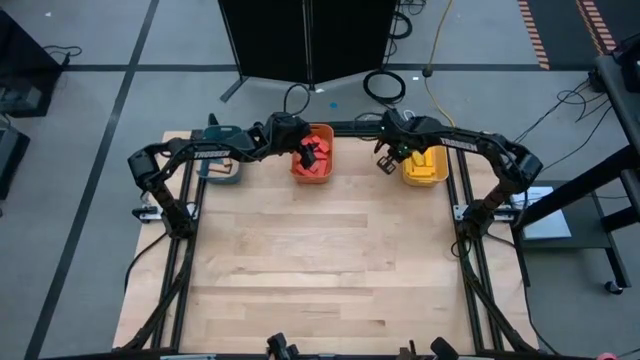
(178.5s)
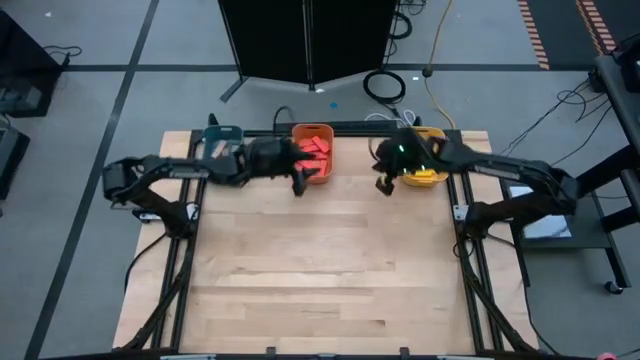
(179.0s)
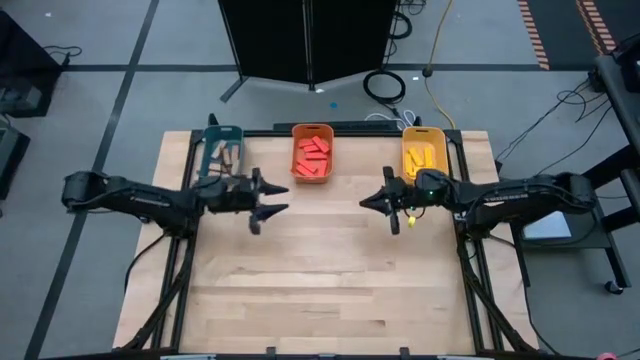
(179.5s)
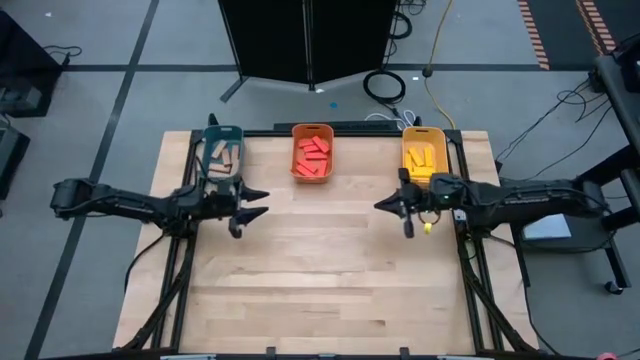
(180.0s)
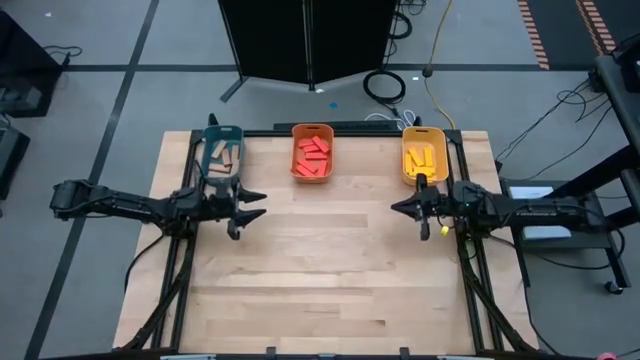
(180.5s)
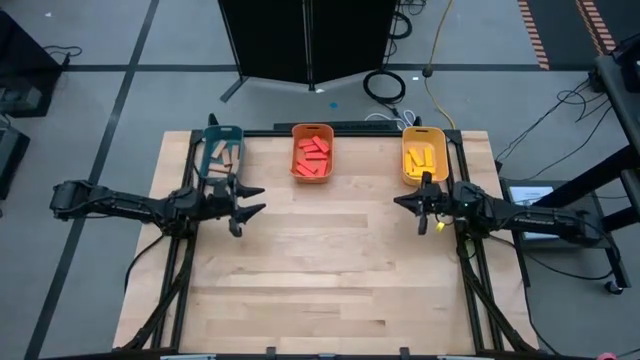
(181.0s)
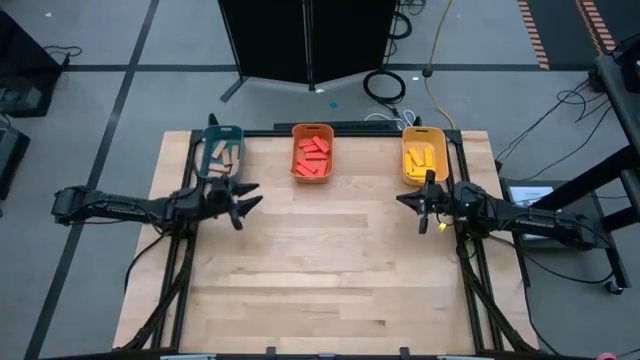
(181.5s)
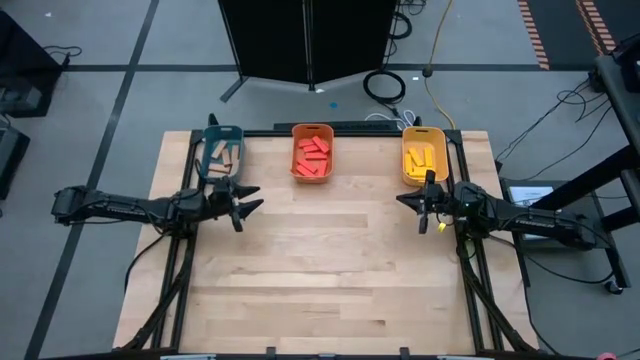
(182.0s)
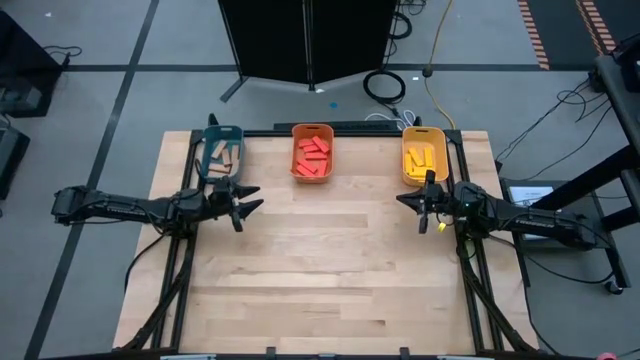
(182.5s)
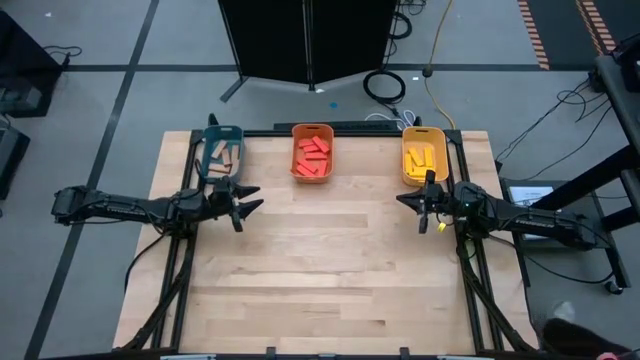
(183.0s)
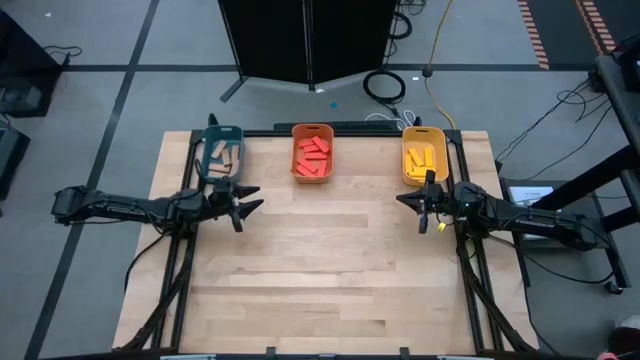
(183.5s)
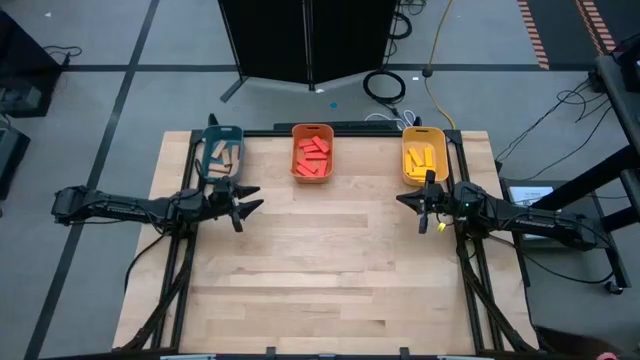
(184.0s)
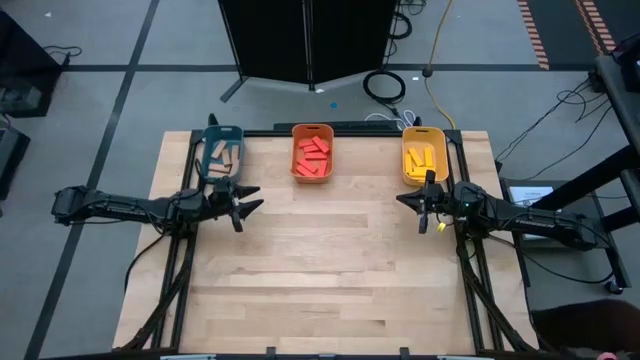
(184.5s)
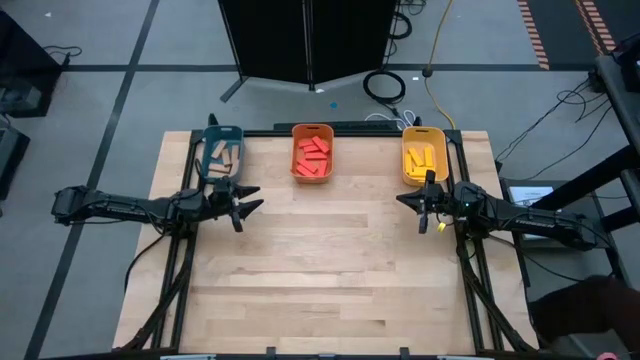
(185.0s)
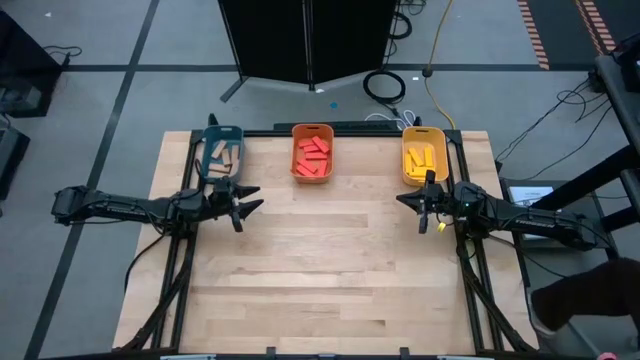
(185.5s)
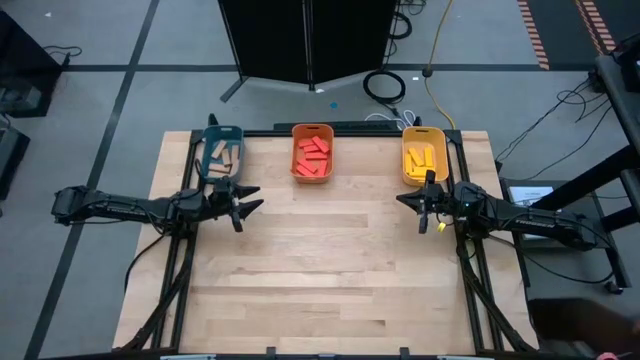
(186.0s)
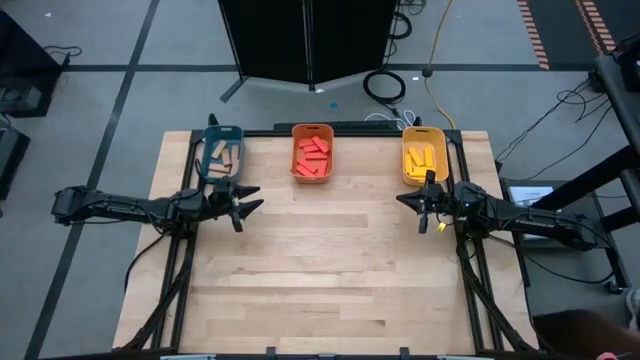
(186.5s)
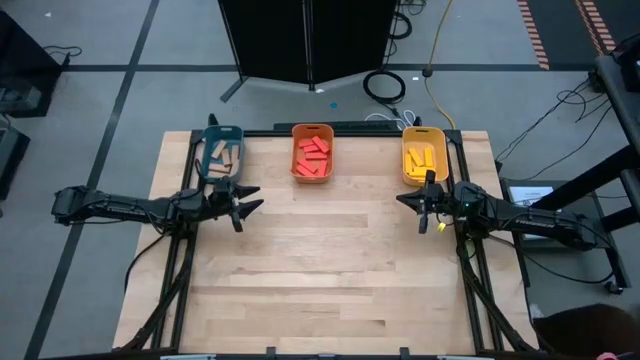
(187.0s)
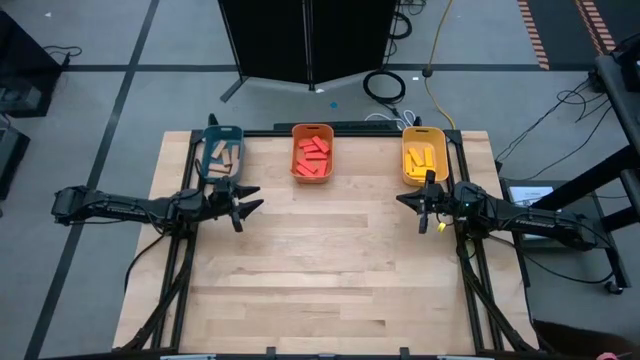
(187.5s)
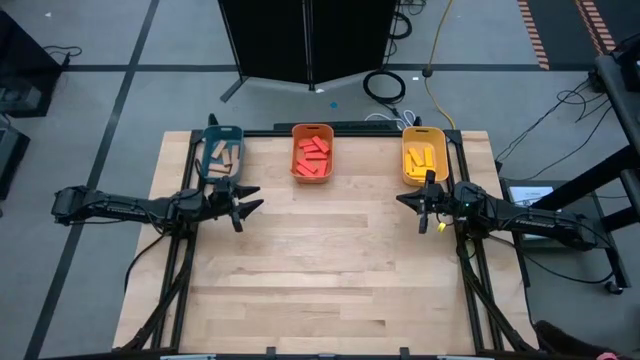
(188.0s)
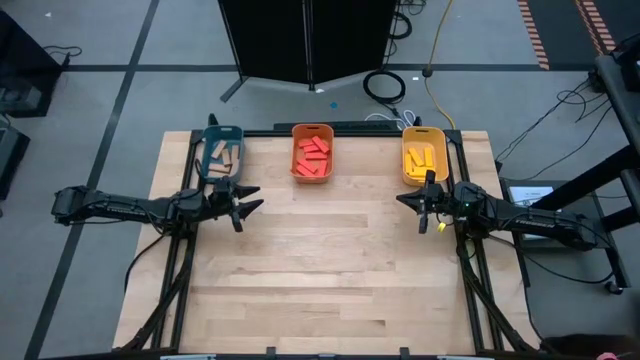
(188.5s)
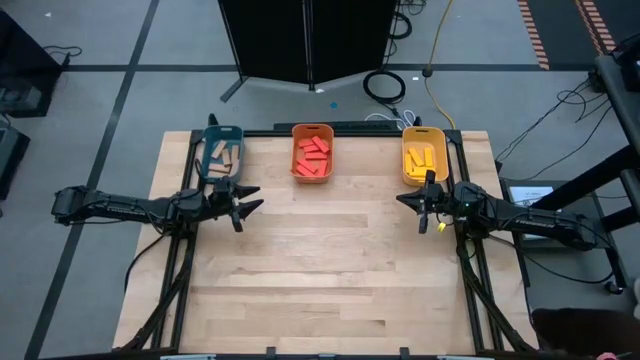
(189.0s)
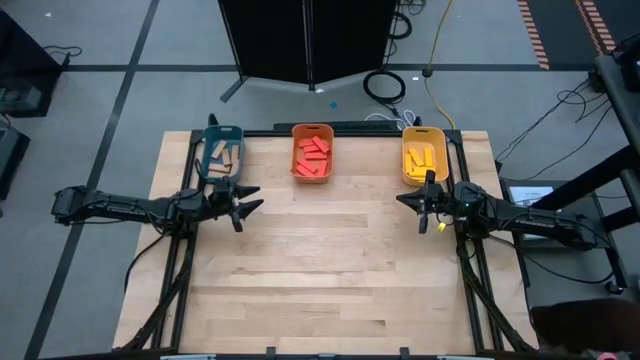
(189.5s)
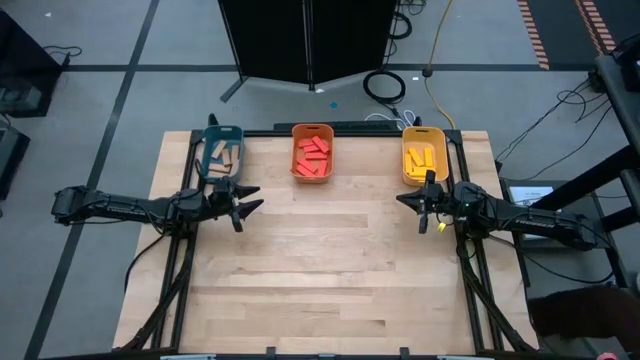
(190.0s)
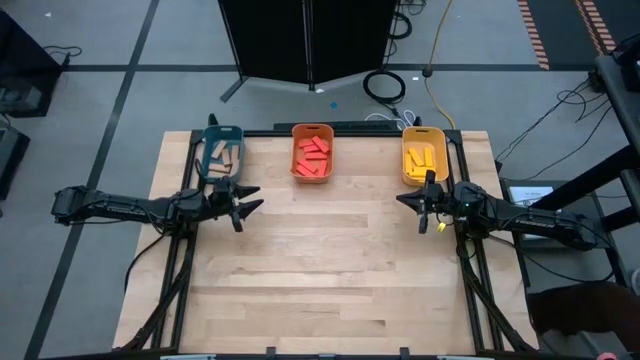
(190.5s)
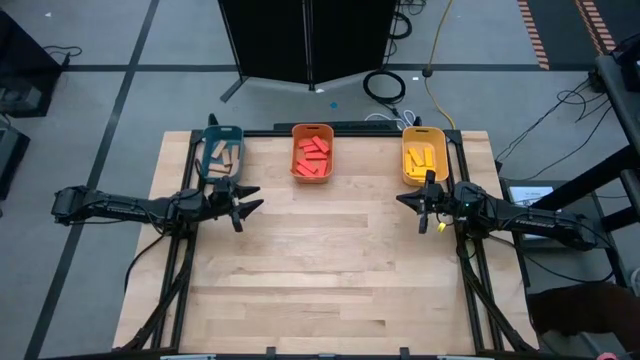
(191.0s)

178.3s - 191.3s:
Task: Sort blocks
Return to Home Position

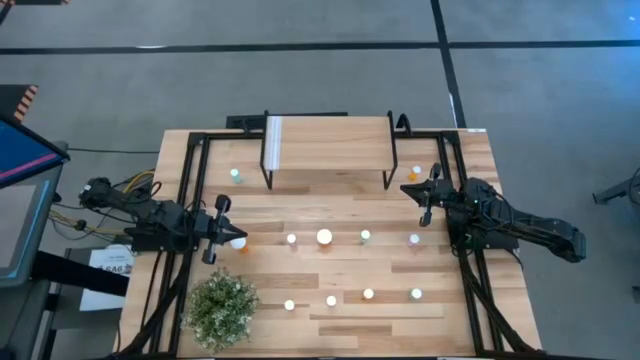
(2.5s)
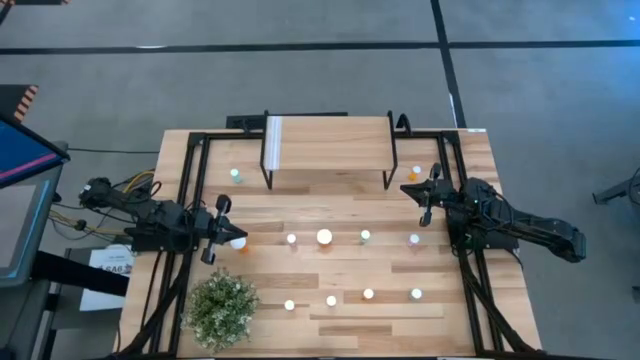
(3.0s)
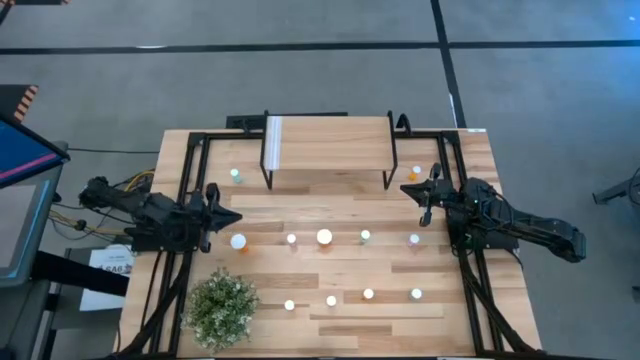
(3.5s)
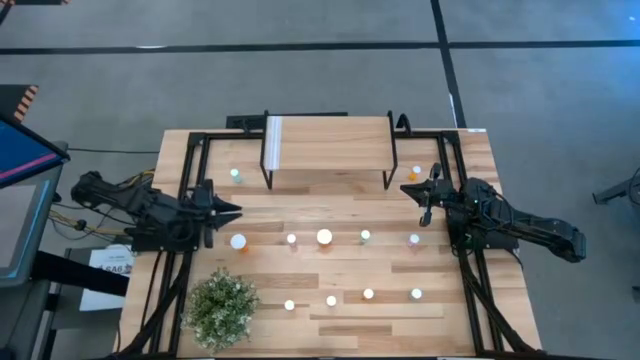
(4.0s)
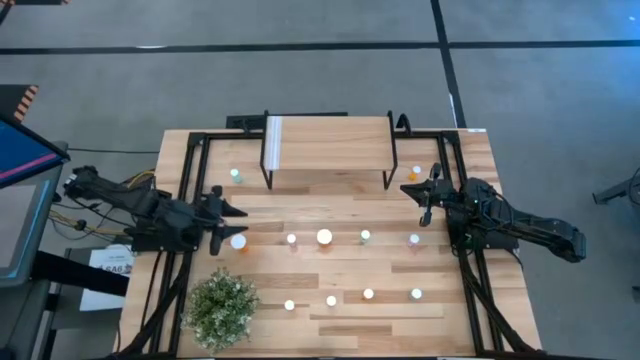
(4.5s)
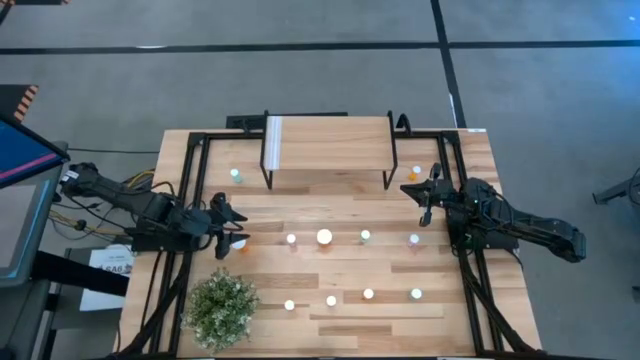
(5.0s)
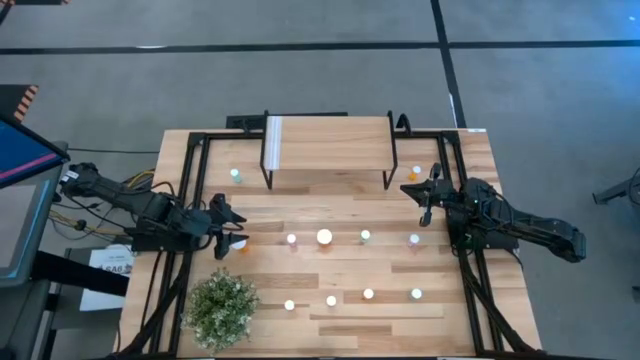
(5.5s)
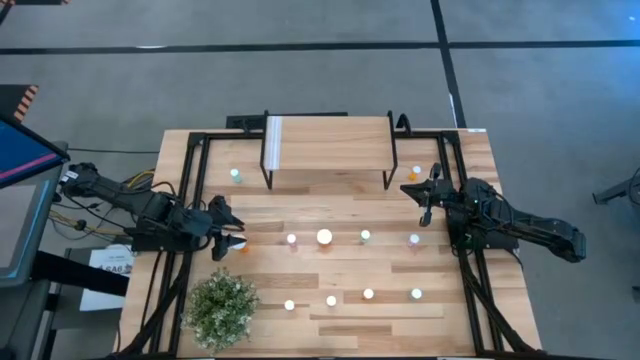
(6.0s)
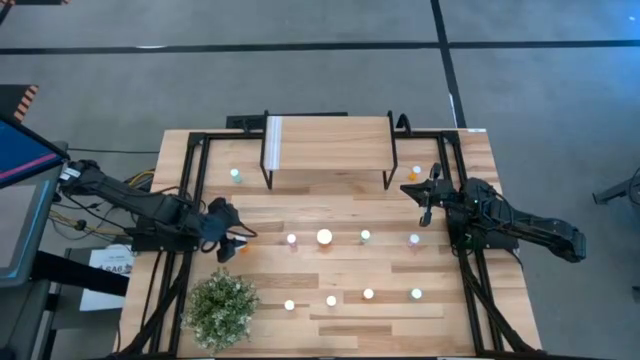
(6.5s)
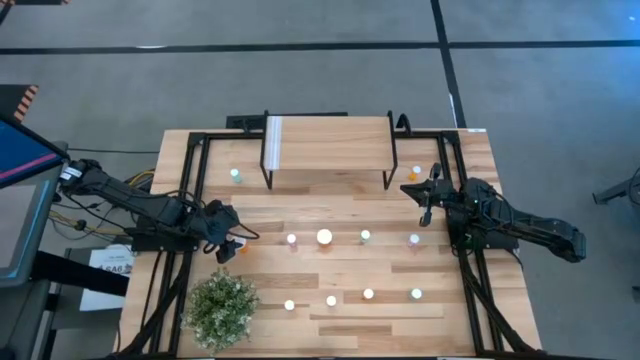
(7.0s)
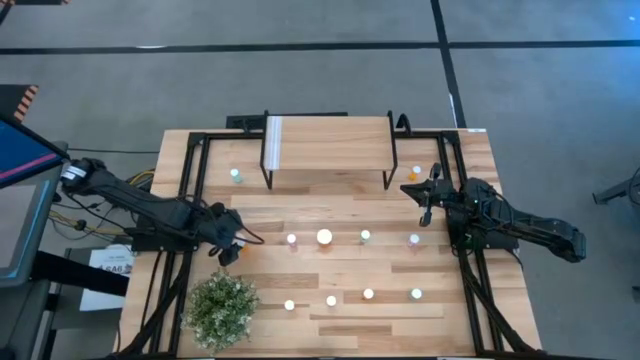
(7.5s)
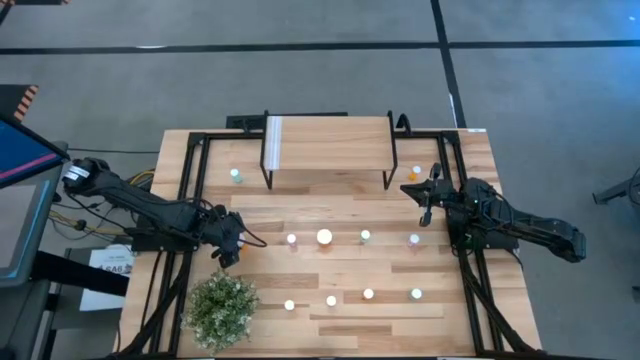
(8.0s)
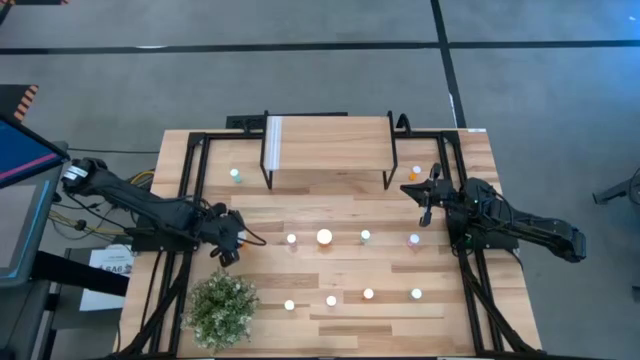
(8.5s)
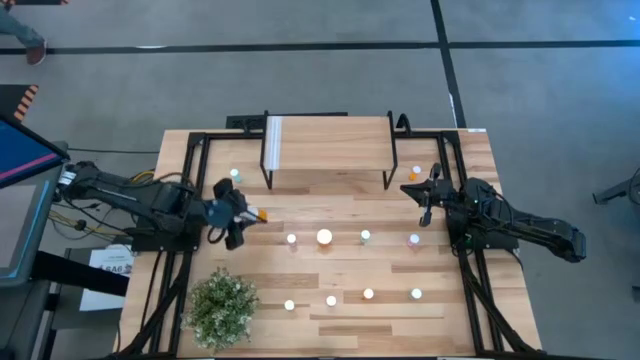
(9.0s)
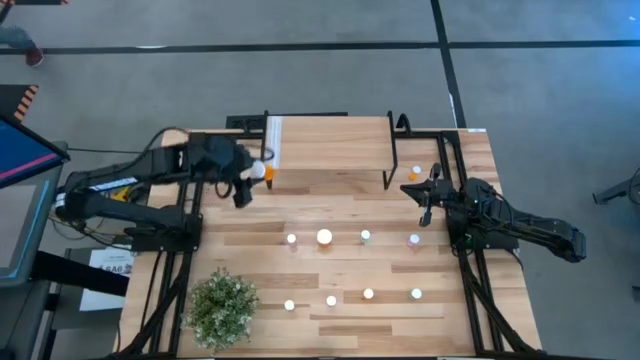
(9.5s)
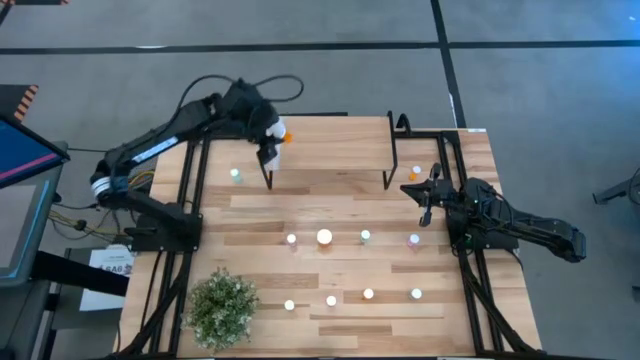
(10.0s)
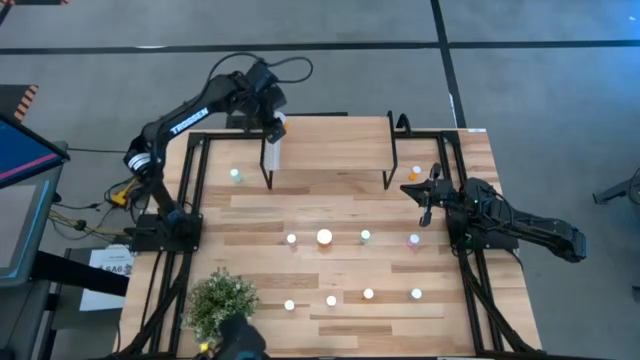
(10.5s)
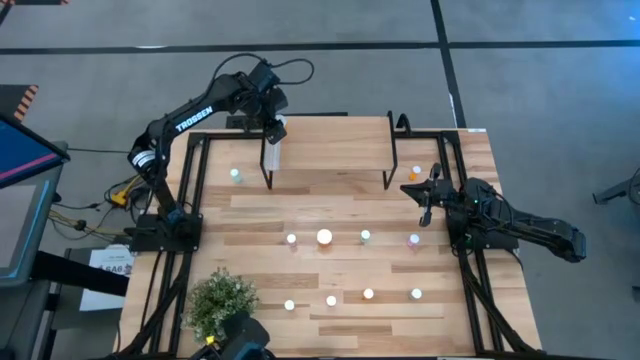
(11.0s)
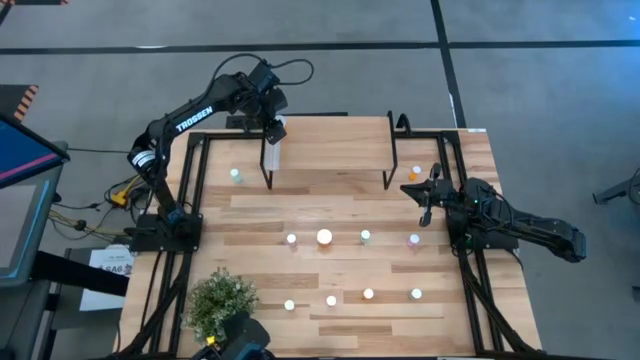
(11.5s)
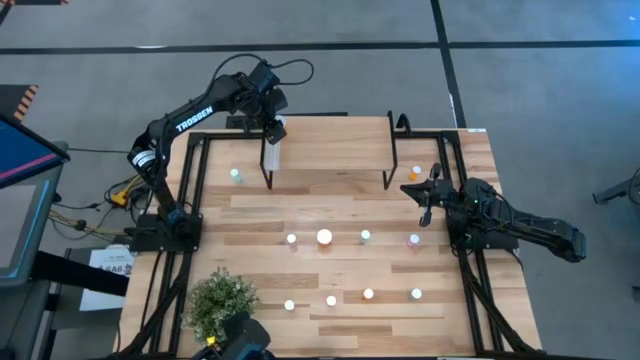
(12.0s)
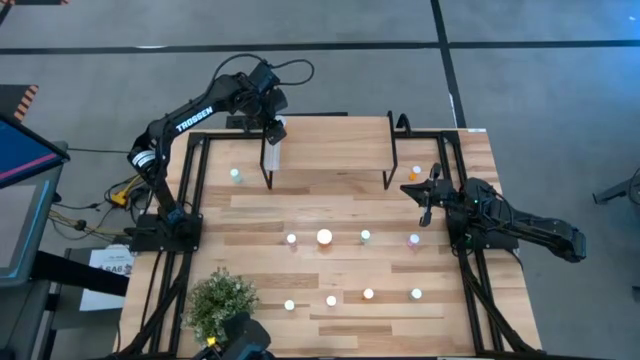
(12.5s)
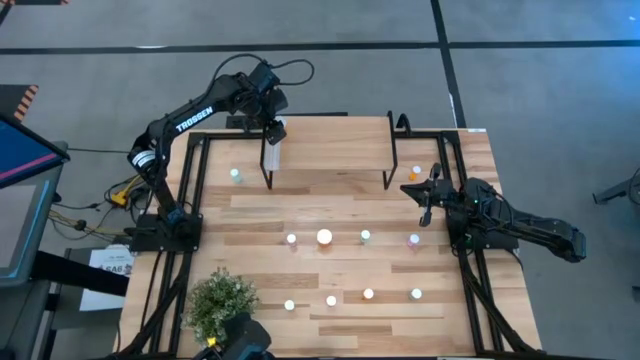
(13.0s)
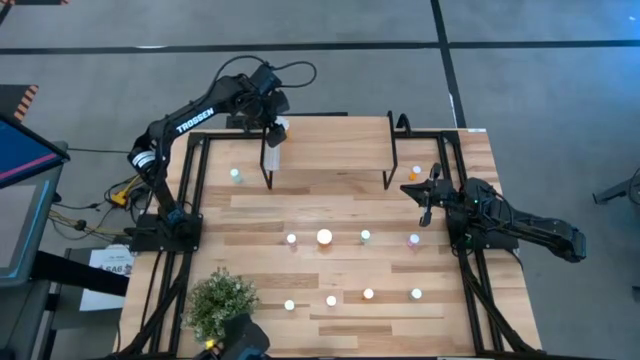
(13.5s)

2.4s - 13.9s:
Task: Pick and place medicine bottles onto shelf by color
Put the orange pill bottle on the shelf
